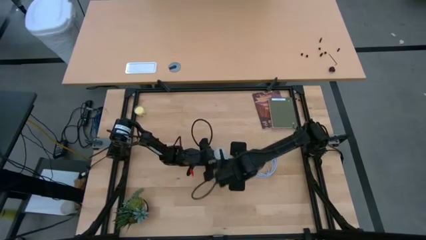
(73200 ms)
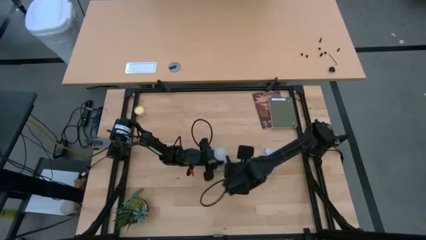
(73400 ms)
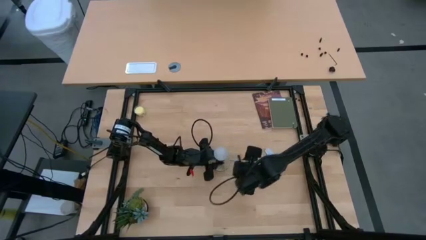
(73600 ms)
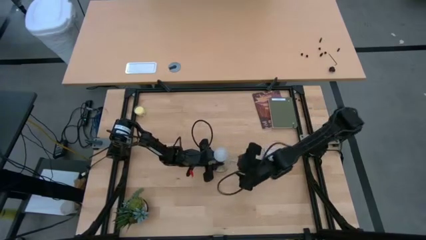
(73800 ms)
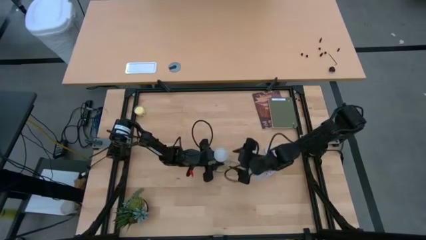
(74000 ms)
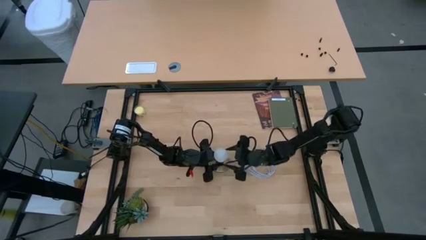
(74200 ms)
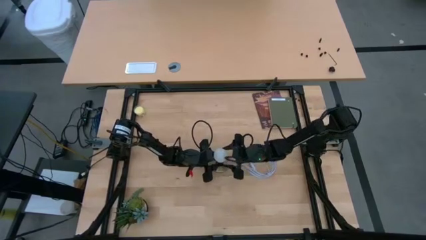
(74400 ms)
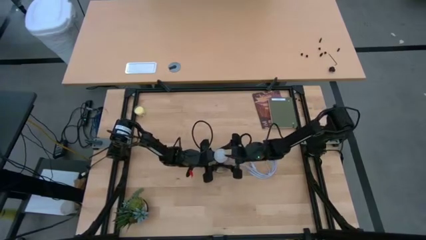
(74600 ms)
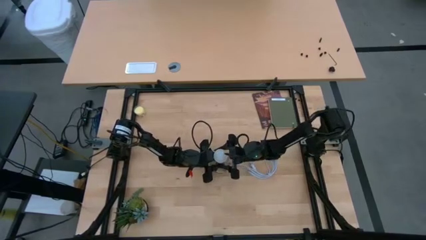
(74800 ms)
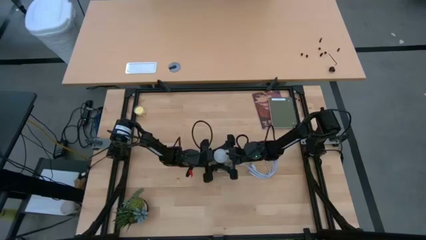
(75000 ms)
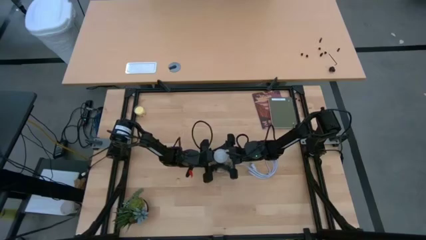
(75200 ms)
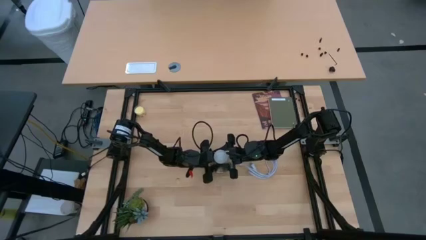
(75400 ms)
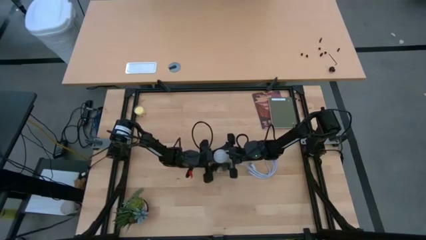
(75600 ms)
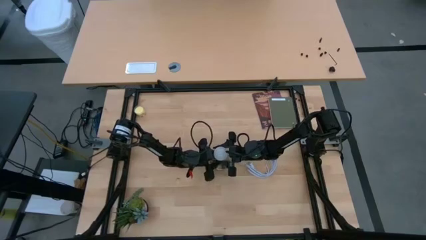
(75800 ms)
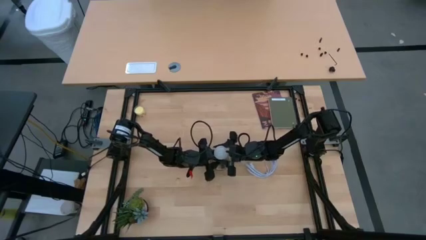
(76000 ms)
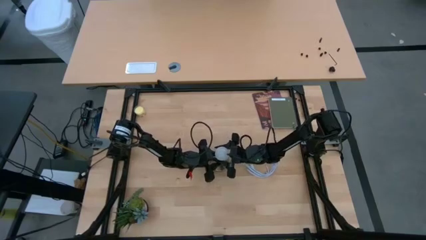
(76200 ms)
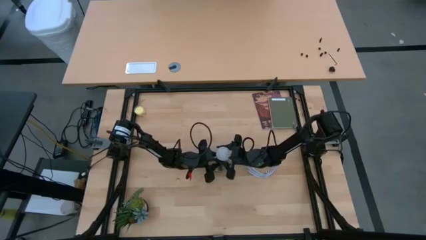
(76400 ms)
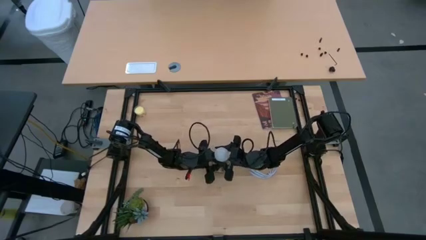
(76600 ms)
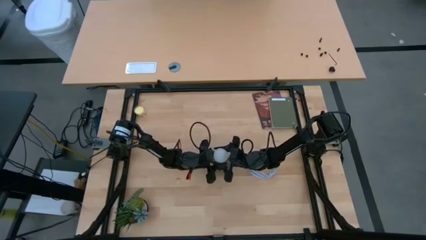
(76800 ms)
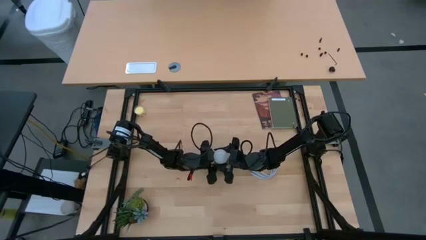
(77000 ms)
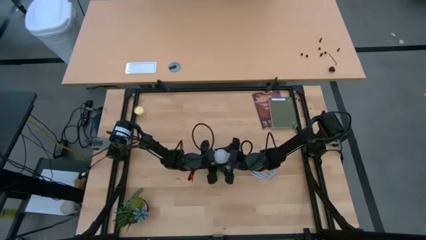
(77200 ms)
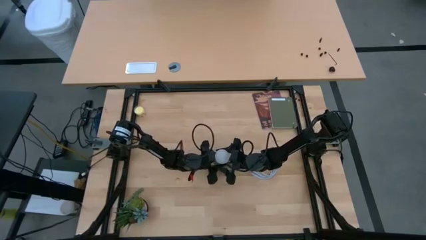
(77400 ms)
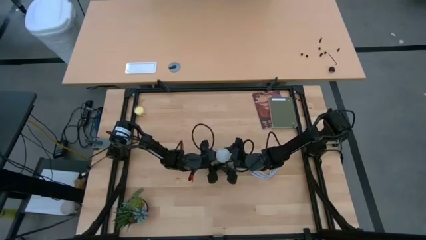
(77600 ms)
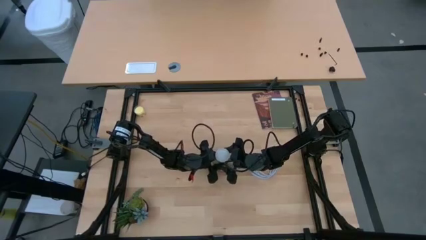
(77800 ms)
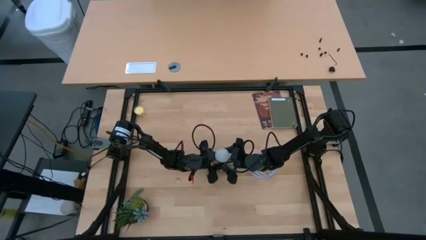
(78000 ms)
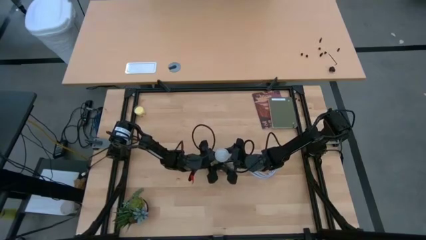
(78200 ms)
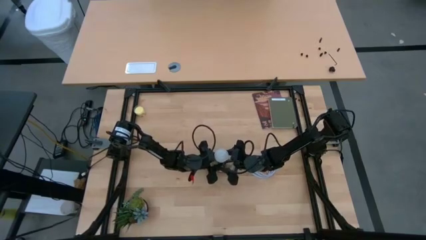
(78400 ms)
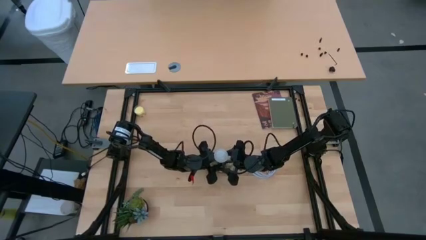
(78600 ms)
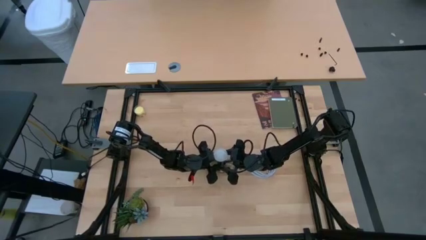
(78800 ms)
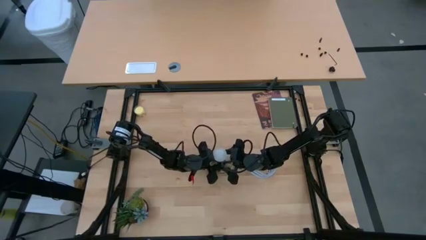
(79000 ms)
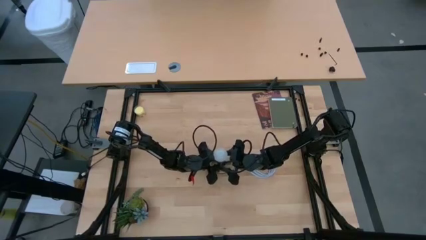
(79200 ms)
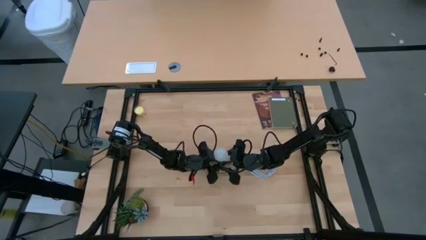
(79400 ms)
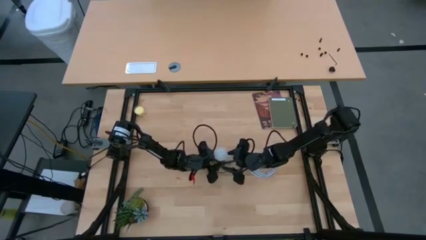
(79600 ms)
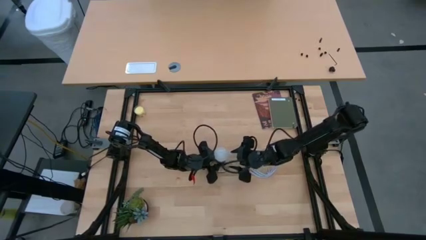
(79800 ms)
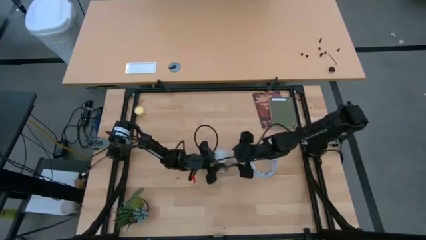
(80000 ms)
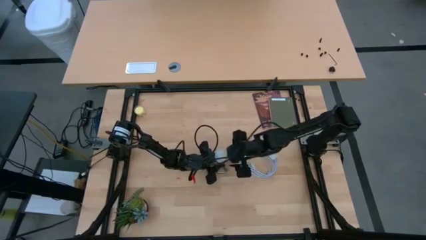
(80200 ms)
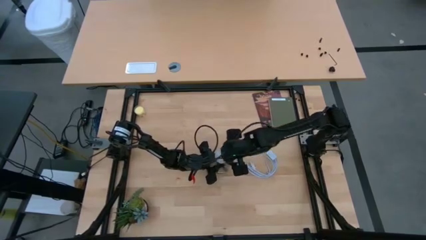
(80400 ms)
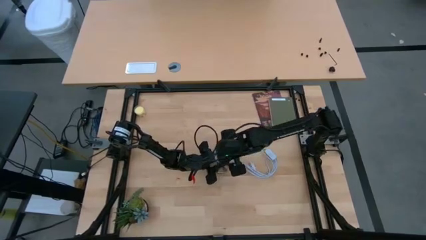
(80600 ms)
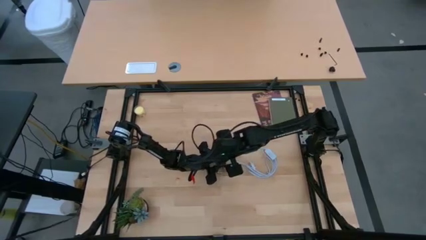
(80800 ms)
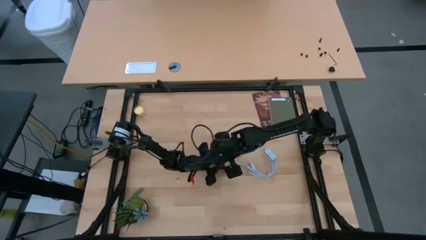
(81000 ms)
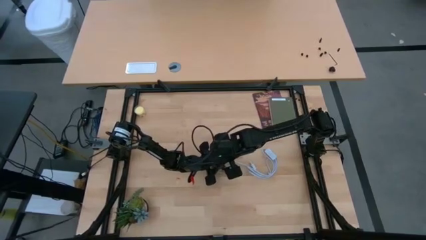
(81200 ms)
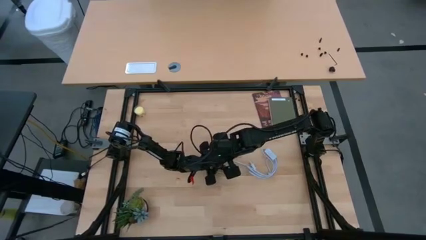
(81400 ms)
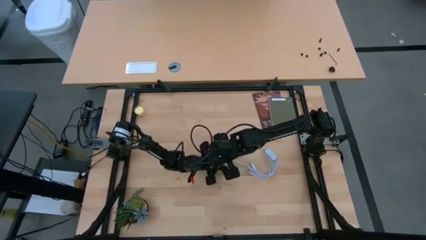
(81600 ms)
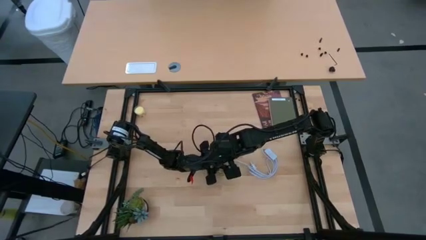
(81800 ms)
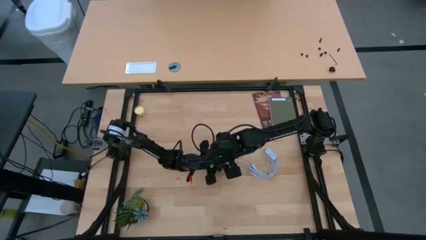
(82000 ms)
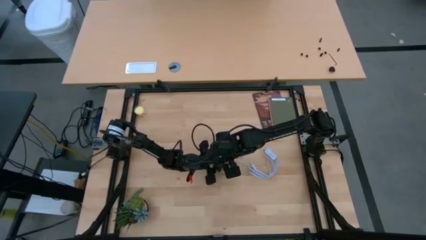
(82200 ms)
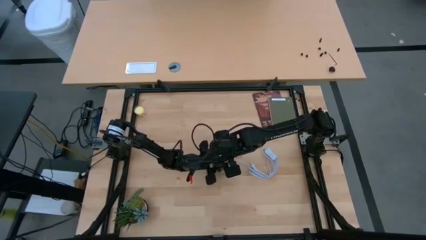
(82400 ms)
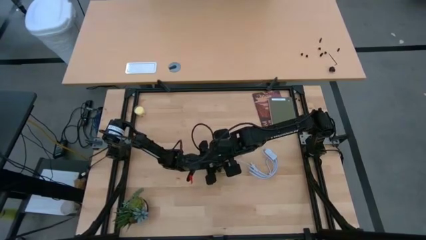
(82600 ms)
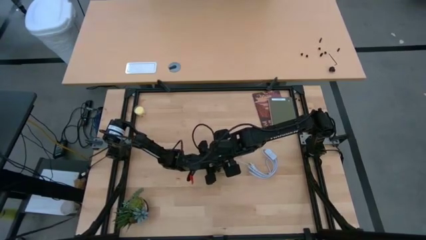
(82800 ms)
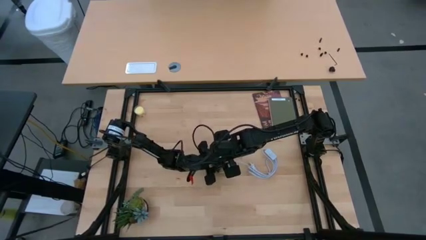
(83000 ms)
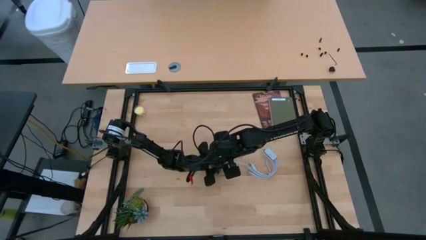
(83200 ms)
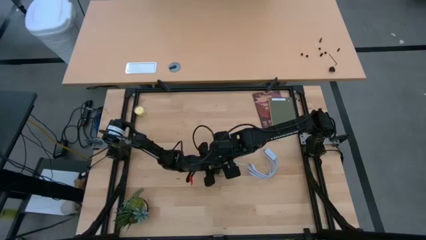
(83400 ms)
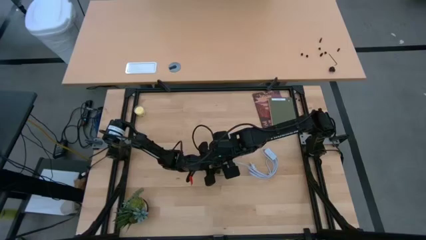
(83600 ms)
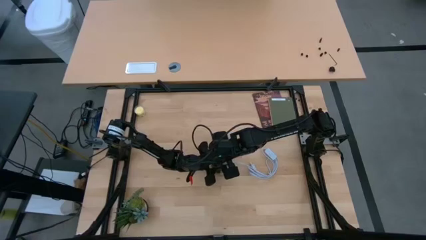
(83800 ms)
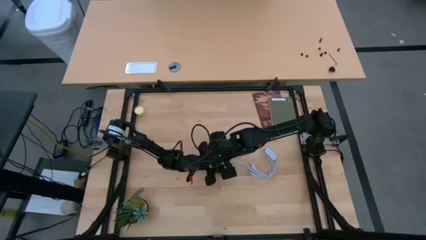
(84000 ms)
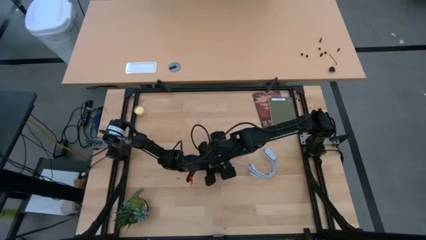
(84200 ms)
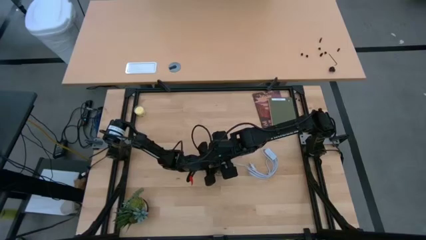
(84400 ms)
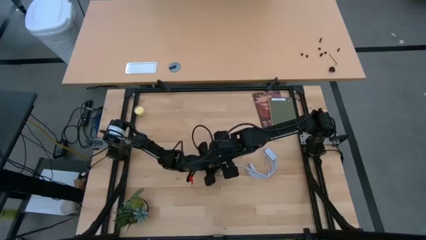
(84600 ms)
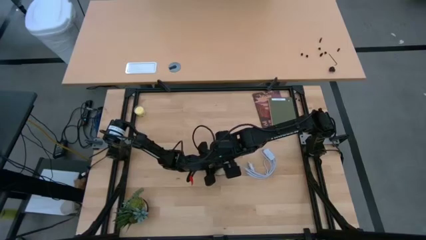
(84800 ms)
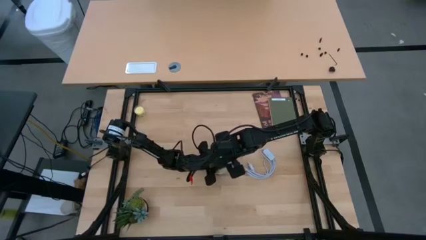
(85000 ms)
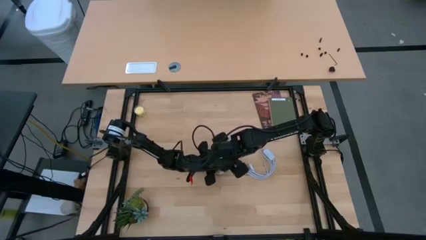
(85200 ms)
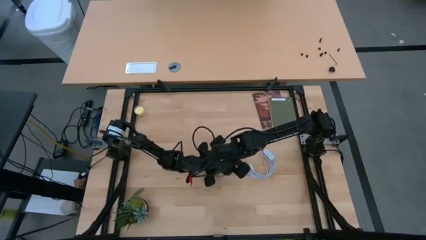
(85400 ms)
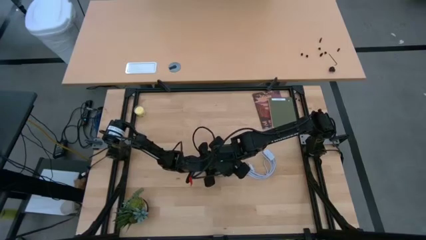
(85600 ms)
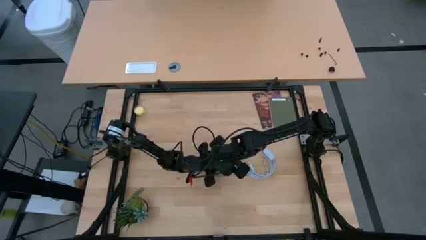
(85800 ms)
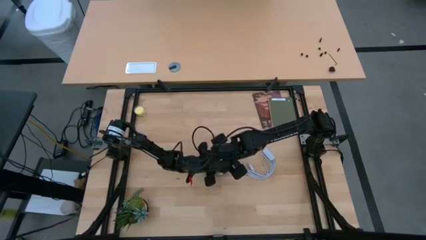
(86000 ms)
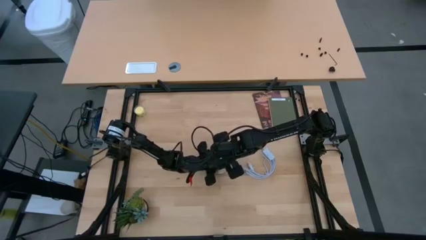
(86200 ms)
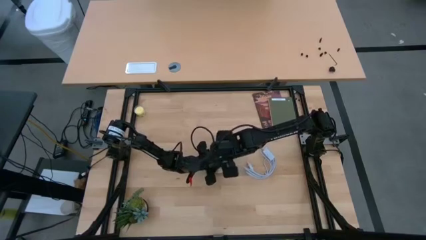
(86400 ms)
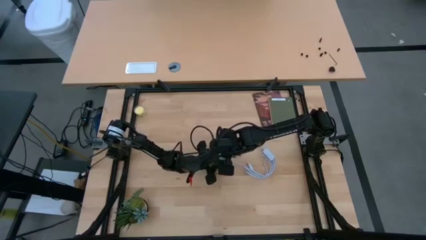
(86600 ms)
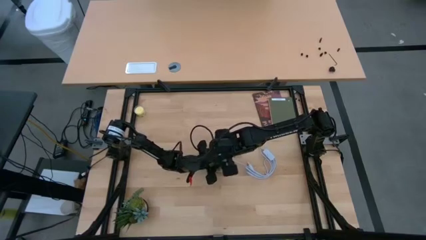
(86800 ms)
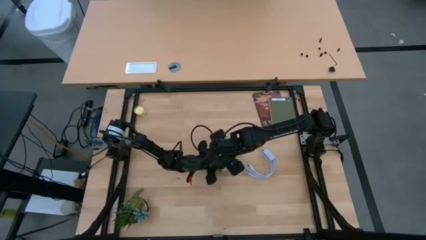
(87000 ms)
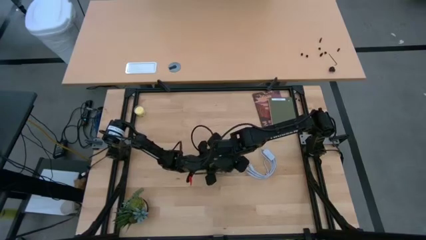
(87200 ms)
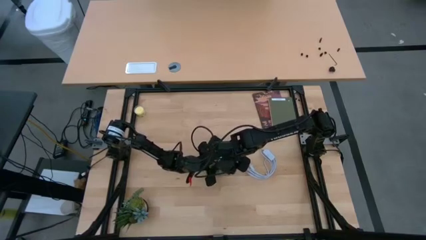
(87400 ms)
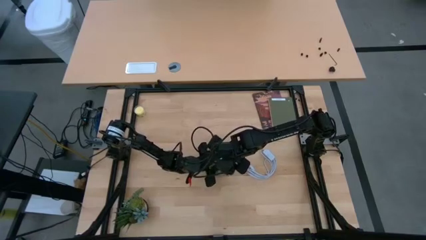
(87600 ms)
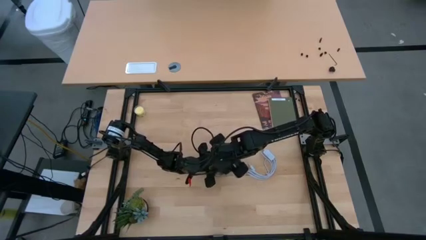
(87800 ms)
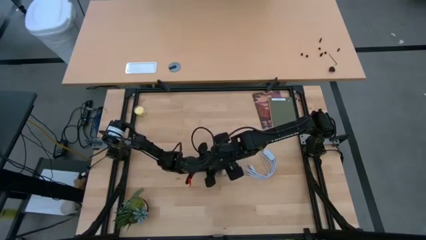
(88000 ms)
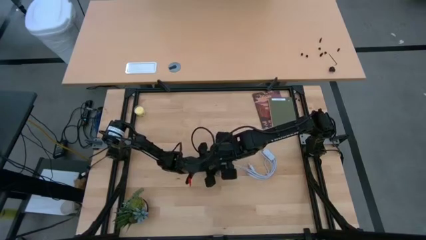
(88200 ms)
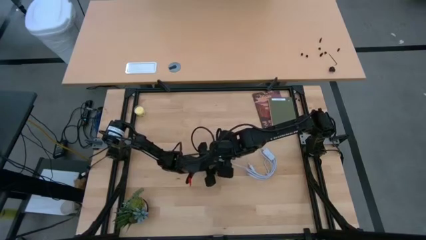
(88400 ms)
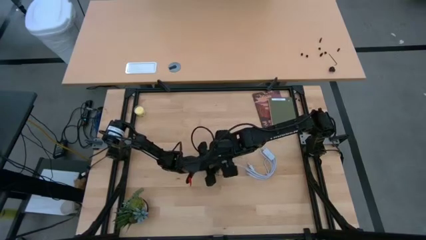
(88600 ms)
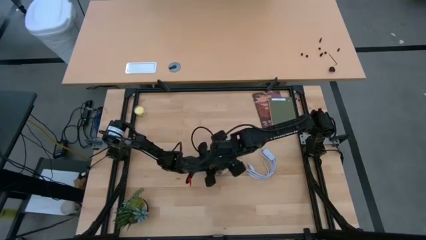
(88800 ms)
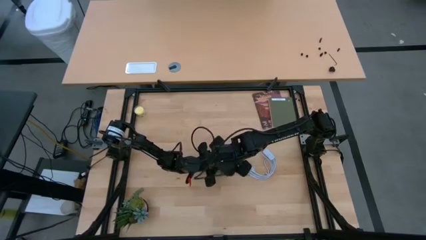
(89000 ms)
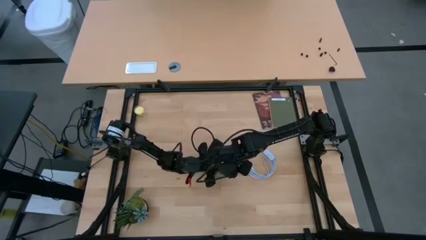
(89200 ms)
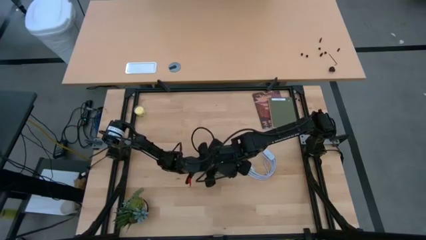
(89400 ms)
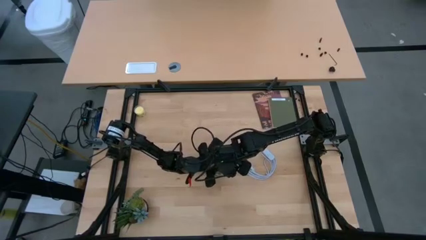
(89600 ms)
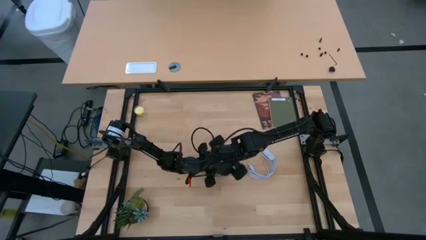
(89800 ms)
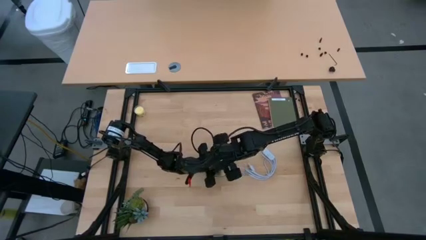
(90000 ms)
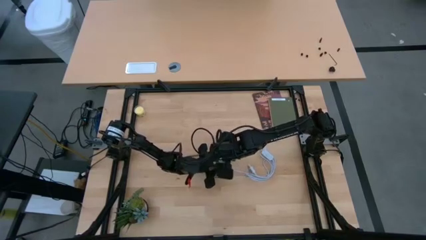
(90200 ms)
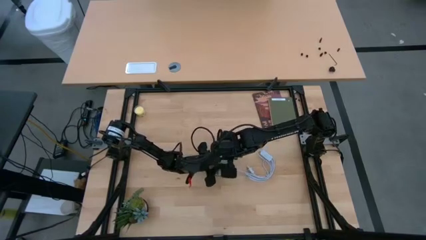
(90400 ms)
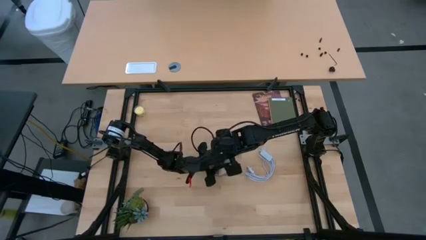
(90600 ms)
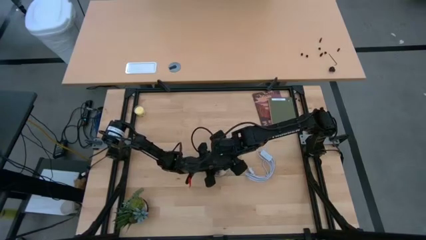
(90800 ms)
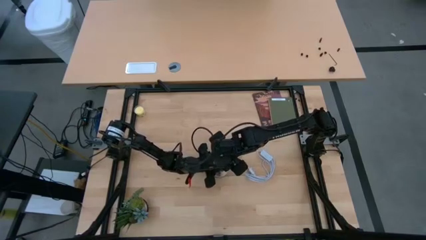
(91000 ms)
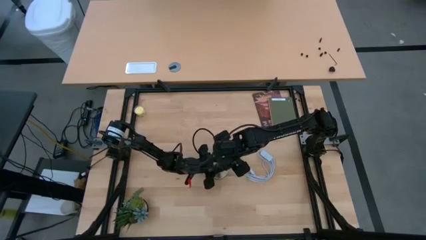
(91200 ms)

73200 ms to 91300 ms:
Task: Screw lightbulb
Insert the lightbulb into the lamp
